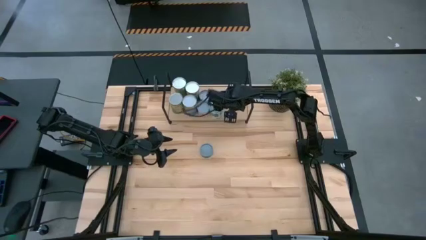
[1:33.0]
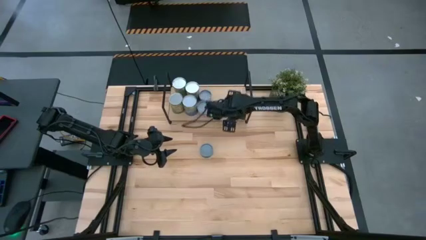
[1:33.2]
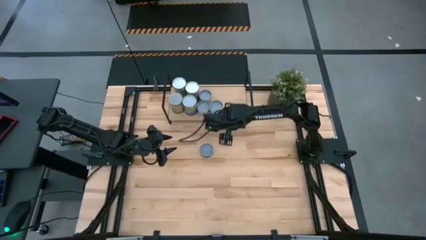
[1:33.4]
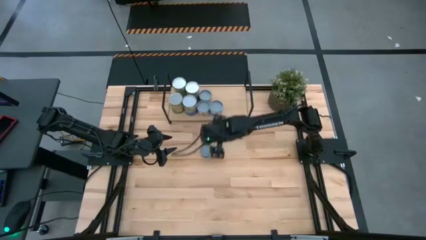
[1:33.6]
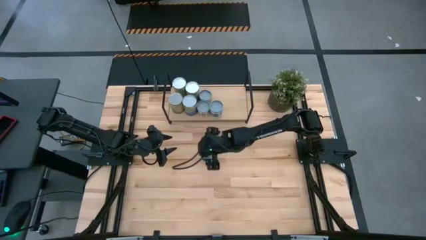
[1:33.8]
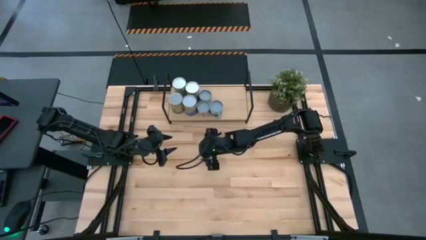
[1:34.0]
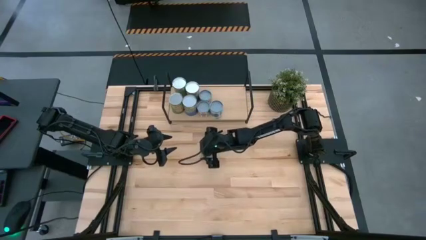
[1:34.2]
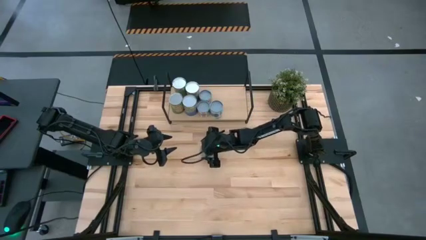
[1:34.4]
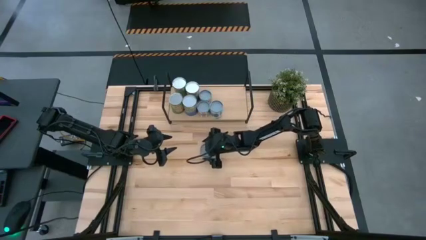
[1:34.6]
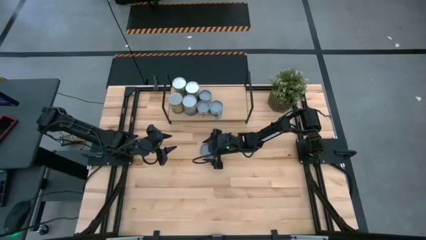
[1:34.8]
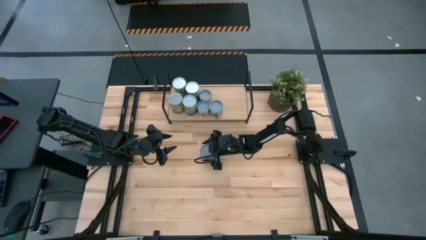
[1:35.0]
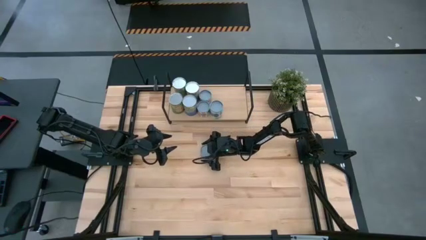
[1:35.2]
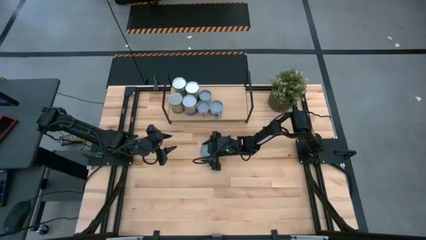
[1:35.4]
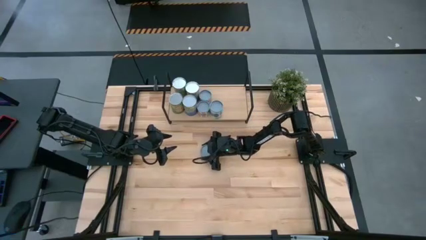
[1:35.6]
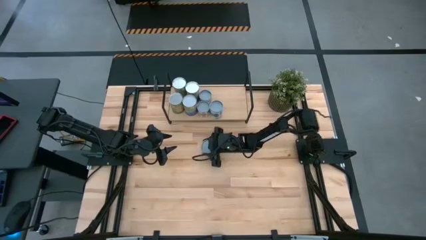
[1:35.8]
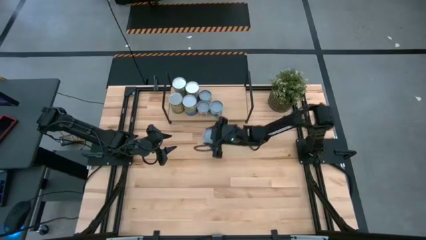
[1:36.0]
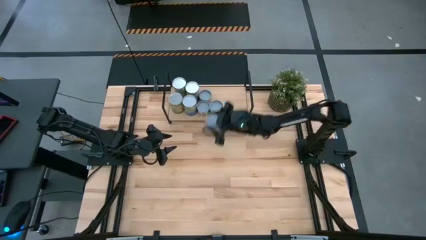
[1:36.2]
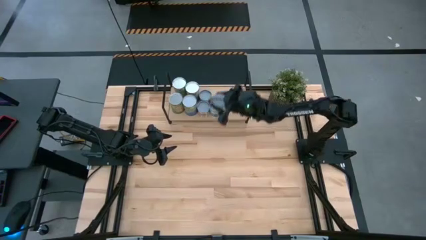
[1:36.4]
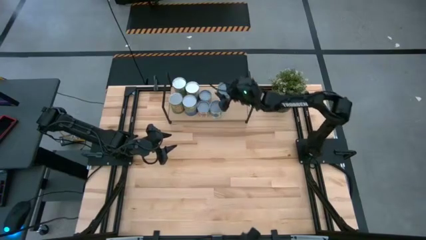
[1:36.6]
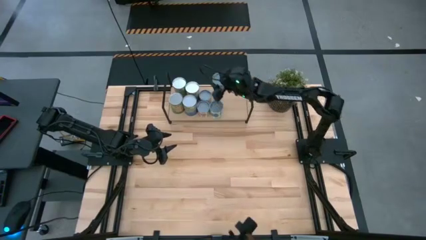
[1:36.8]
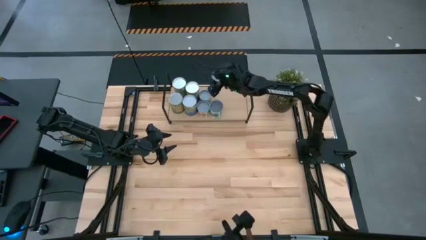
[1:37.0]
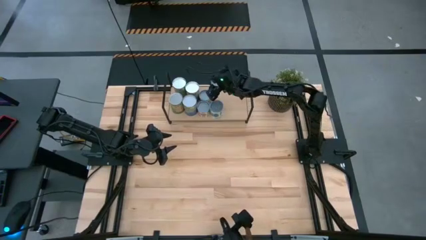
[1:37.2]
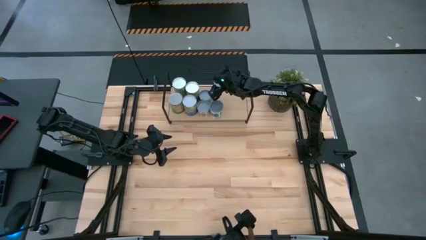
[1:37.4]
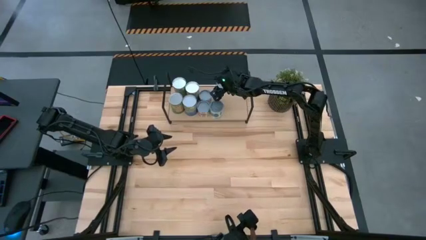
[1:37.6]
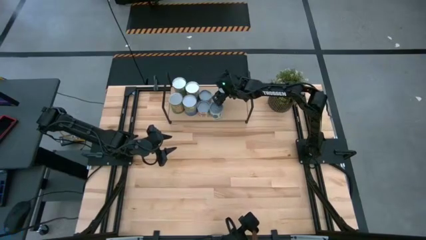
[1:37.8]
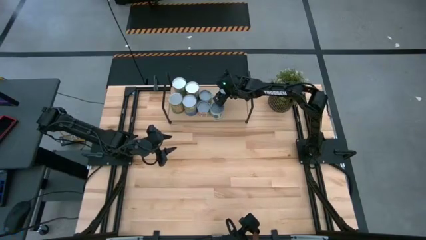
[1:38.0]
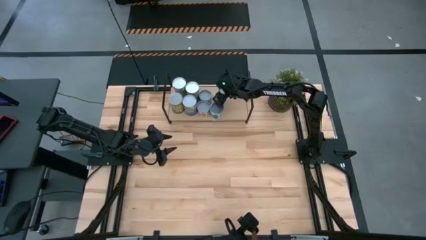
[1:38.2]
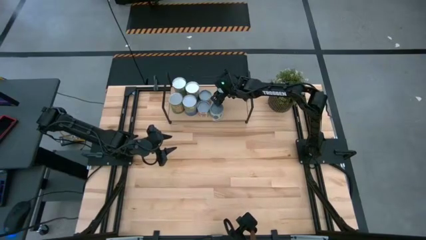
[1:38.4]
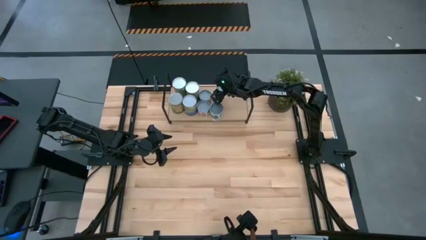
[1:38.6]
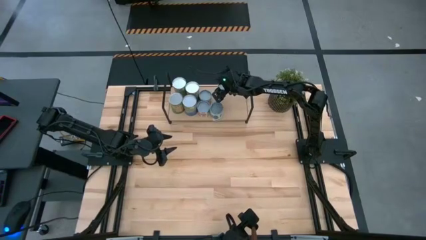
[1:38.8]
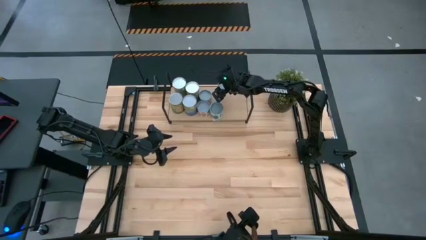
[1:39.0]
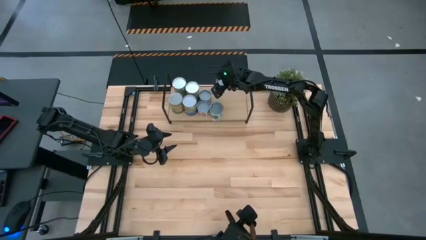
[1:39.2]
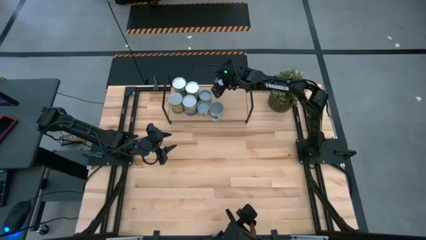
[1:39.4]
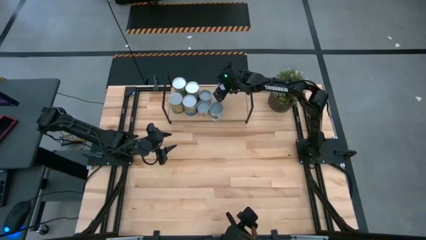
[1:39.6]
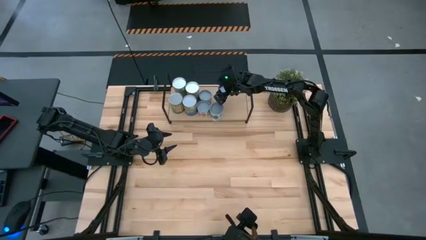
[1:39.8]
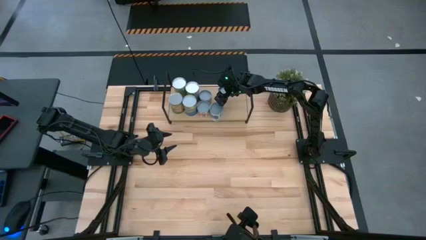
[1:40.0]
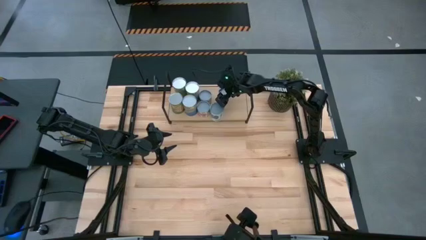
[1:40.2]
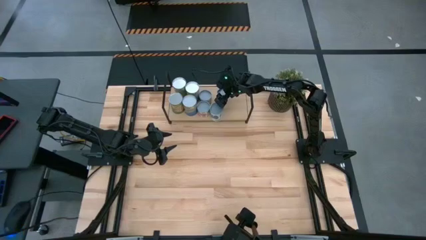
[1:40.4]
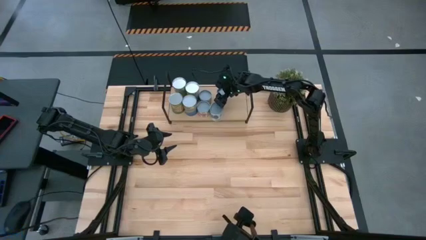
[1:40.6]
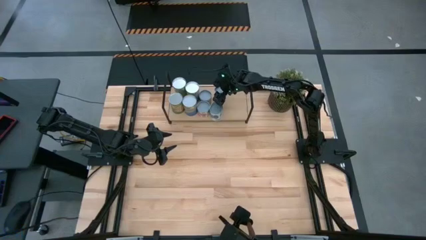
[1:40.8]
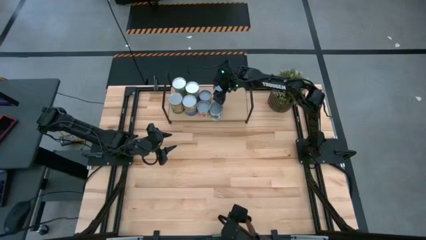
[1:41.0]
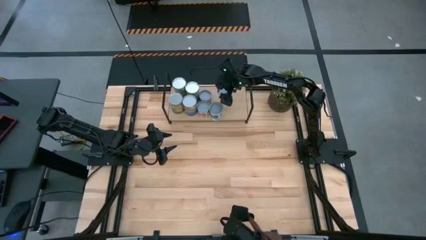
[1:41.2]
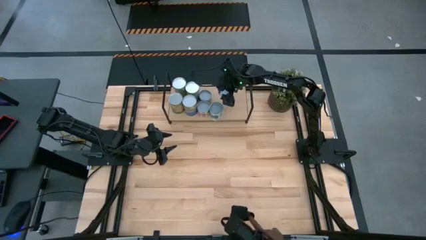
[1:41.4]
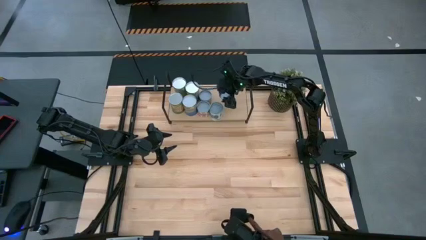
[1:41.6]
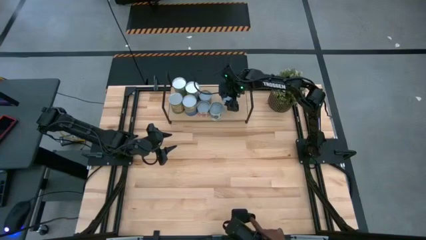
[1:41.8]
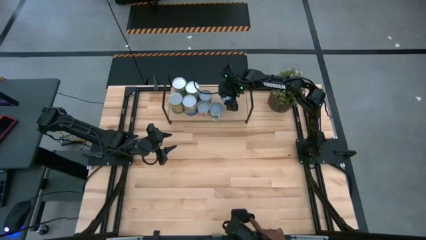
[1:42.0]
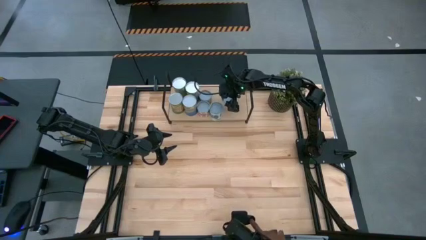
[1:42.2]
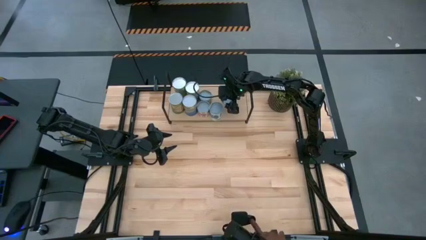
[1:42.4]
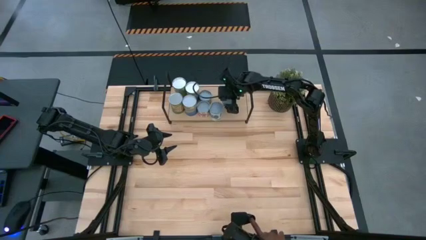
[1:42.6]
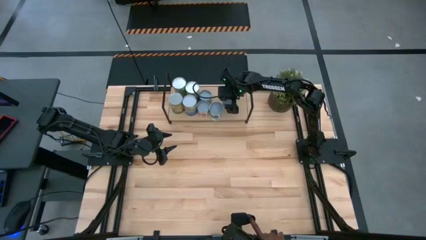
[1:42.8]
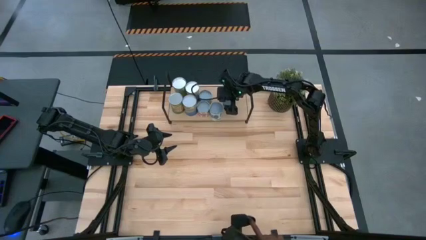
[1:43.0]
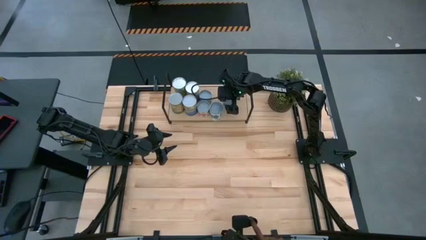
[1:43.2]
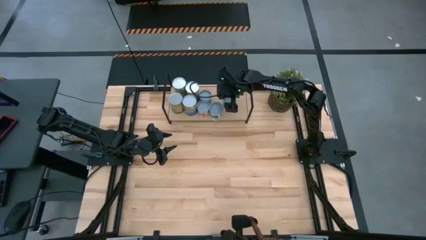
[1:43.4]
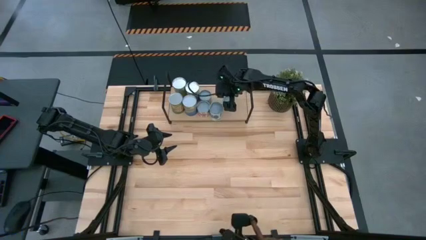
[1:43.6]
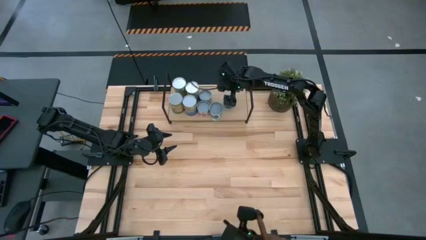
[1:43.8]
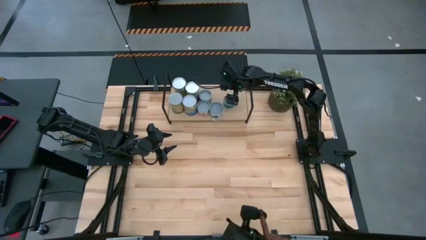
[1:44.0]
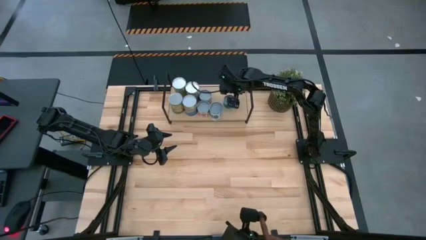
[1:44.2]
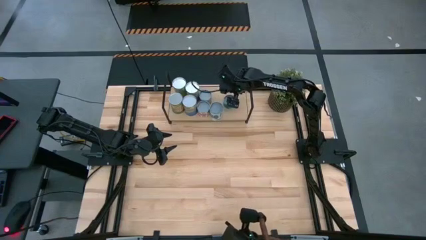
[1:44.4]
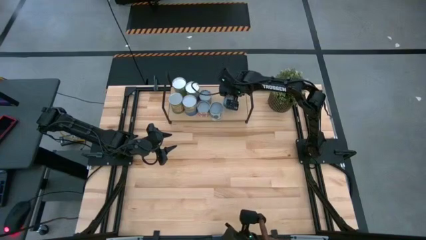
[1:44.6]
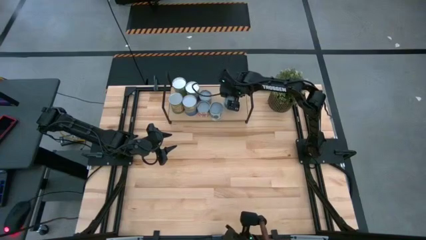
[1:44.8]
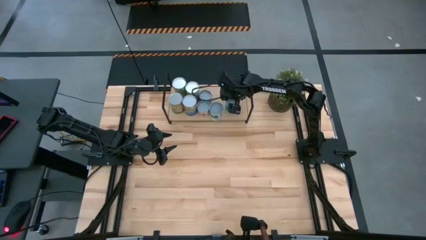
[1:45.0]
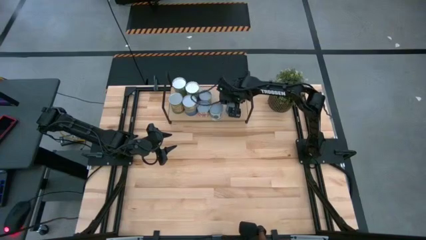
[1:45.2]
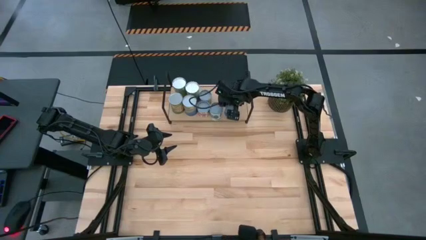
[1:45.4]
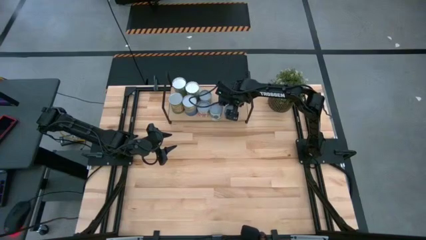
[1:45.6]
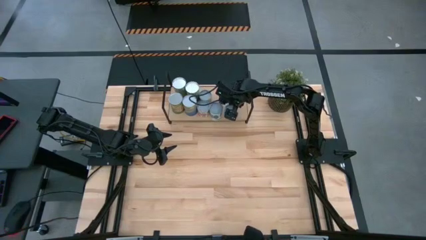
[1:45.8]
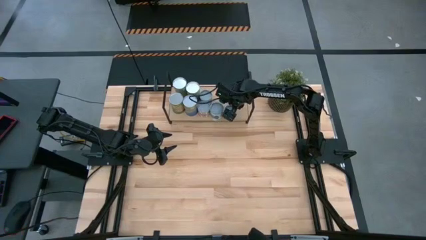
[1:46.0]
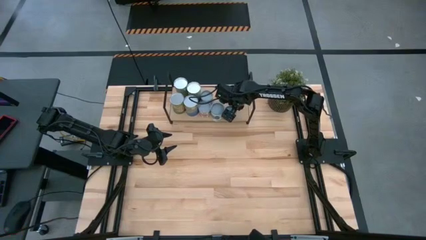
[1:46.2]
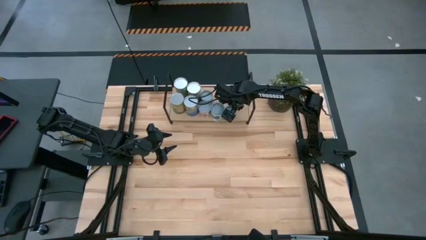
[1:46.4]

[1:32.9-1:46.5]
Task: Pick and place cans onto a shelf
Put the canned tuna on the shelf

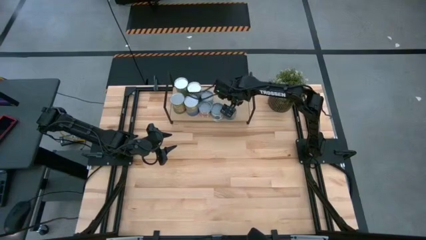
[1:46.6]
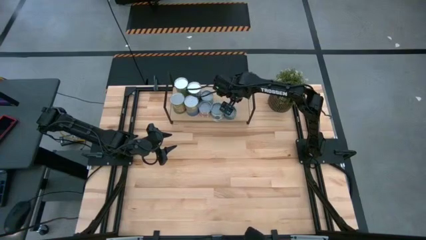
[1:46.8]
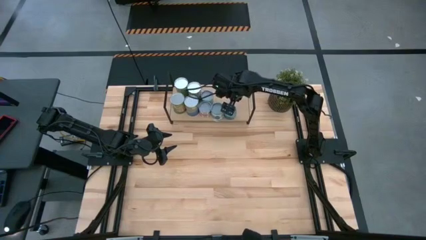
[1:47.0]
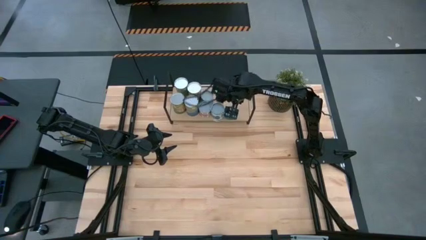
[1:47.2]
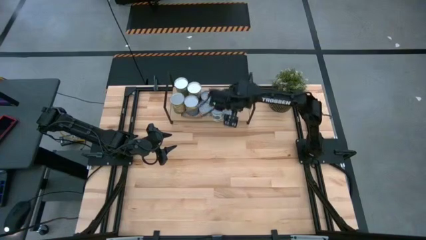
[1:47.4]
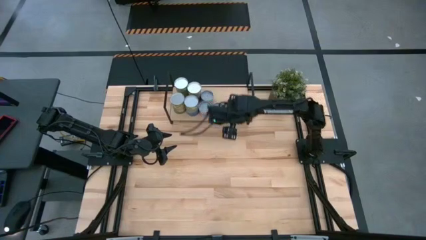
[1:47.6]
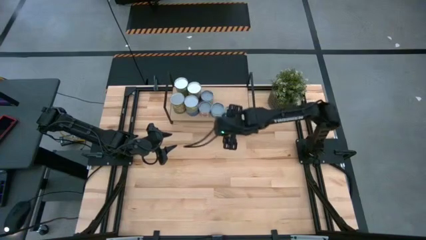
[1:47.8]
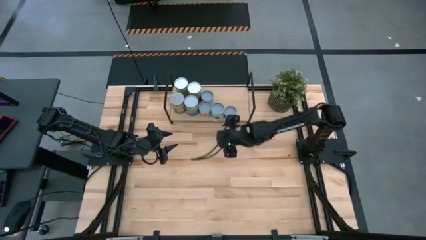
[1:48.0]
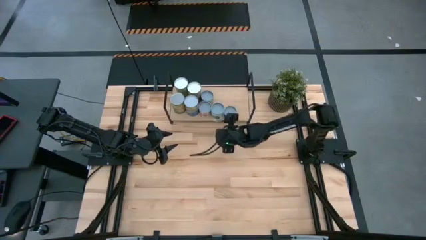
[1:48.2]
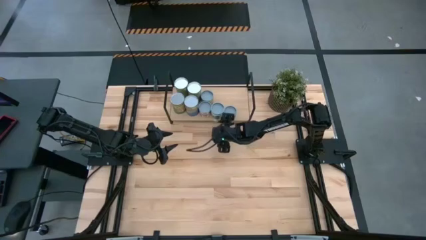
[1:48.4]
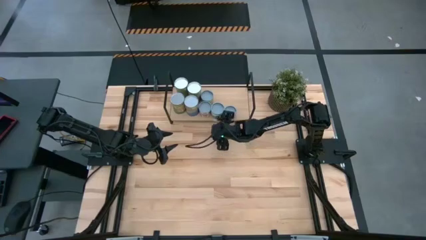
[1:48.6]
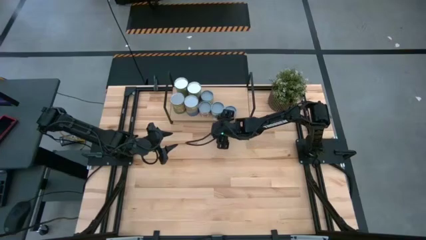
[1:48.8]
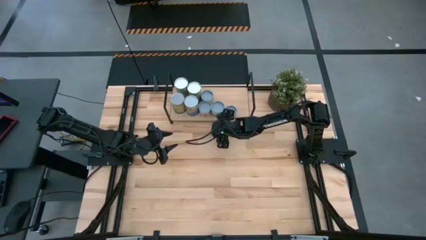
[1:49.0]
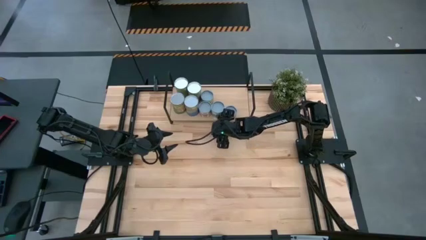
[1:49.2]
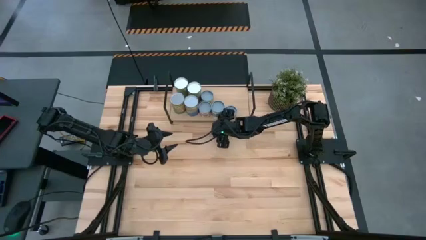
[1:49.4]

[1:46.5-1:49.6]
Adjust the canned mixed vegetables on the shelf
